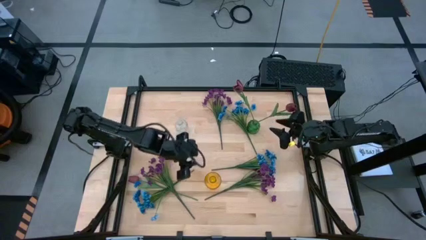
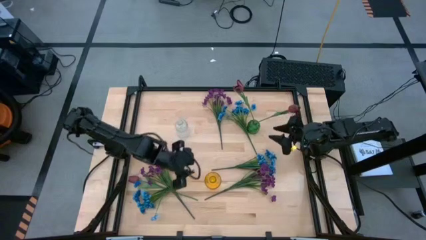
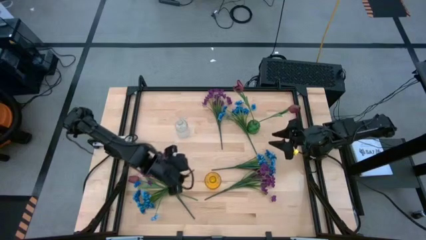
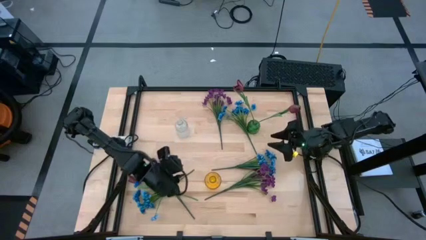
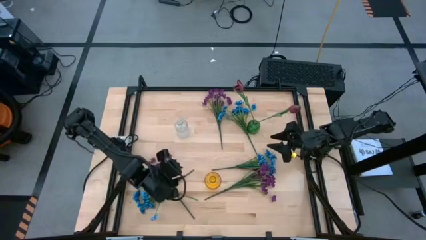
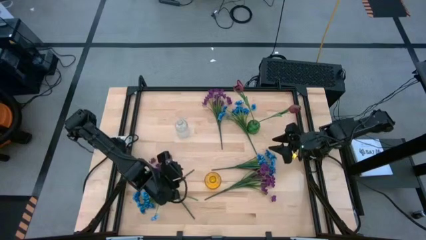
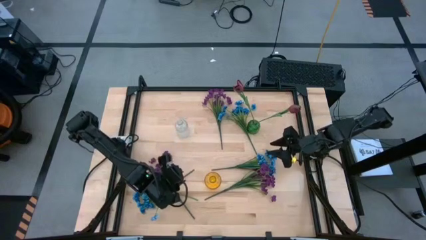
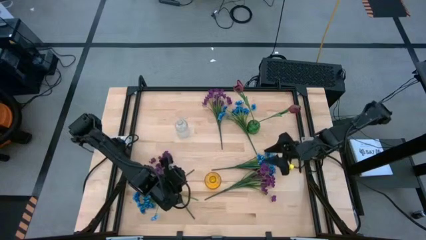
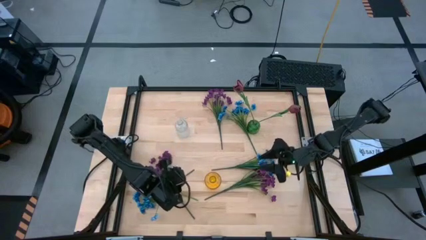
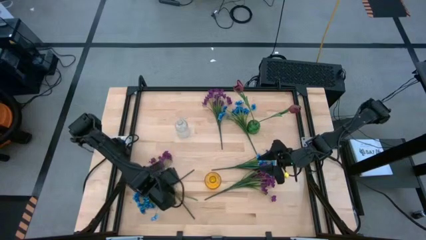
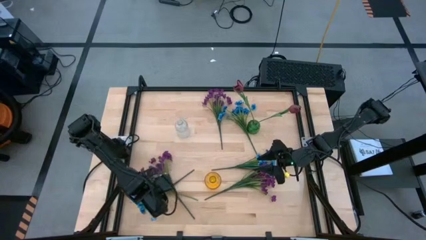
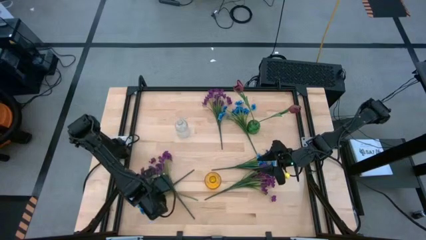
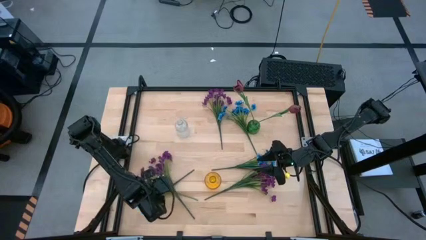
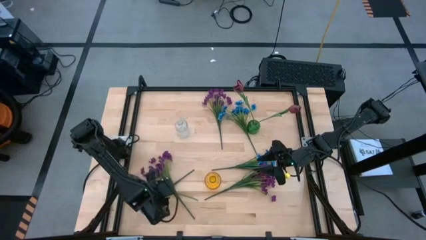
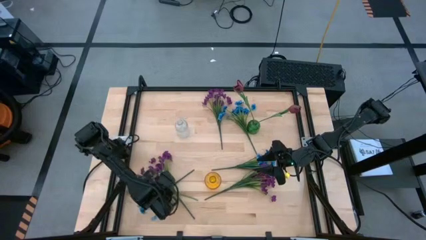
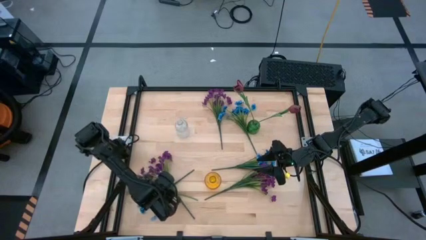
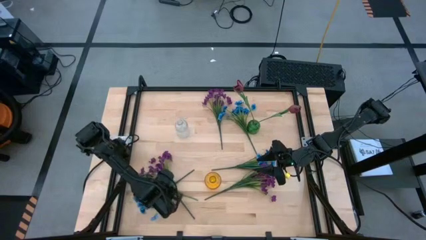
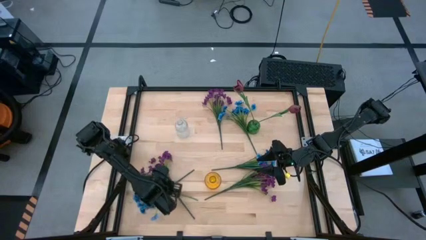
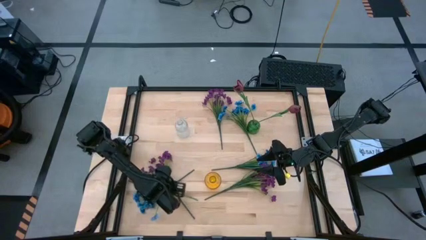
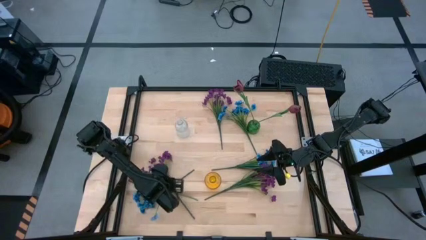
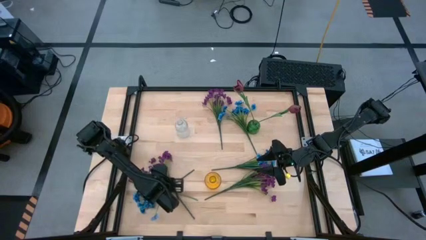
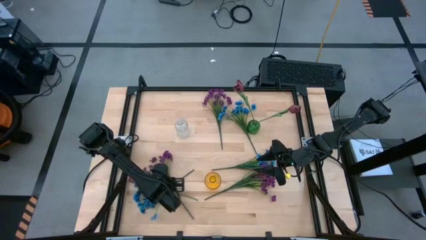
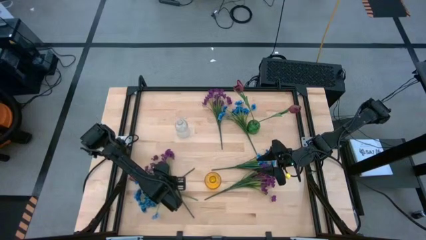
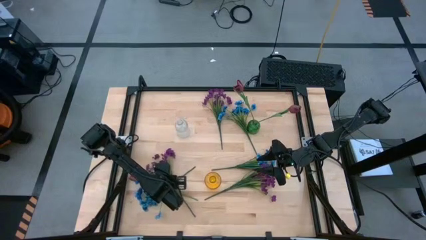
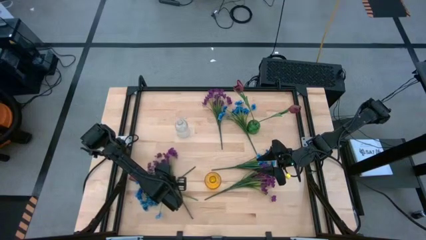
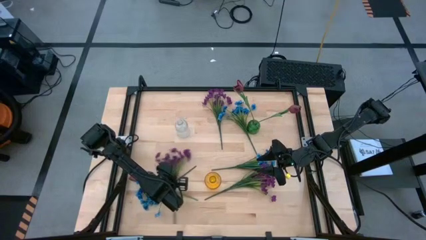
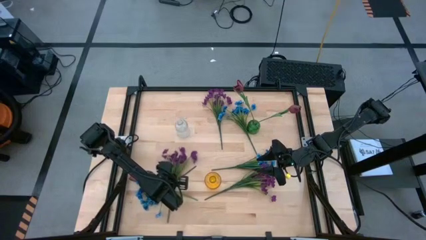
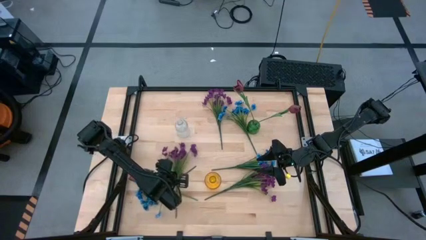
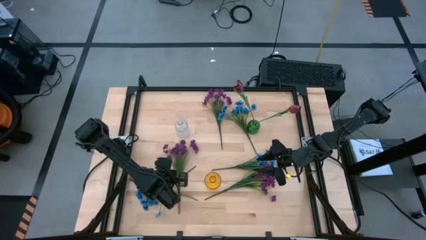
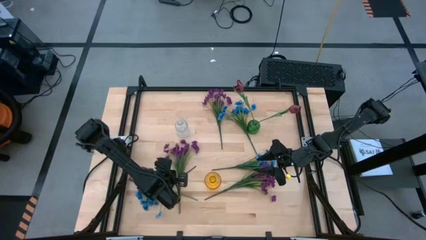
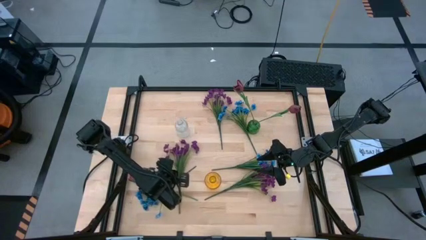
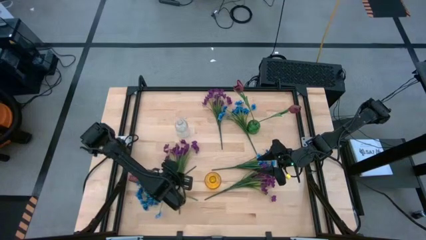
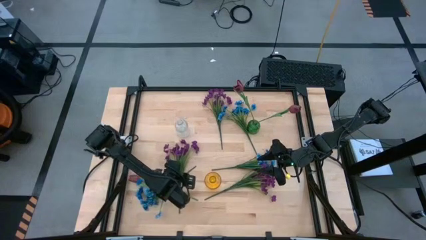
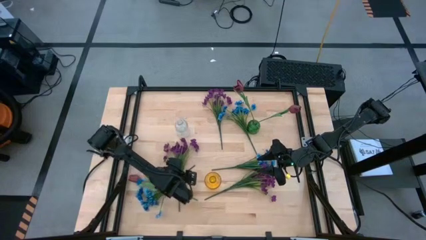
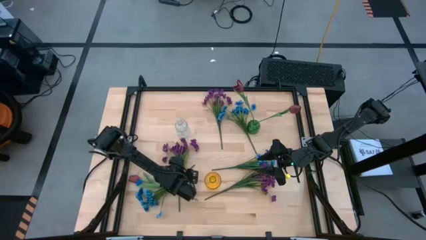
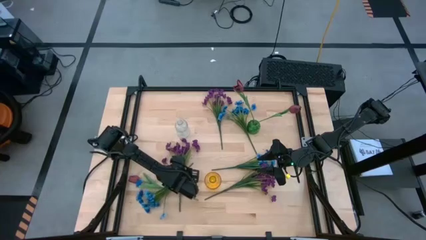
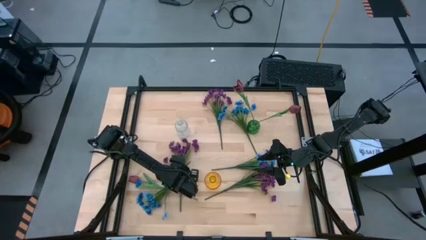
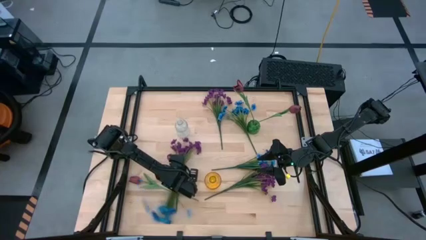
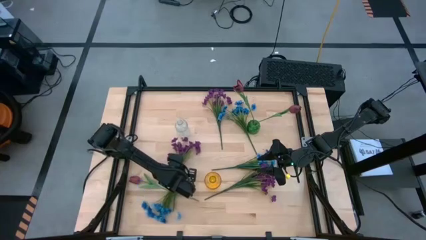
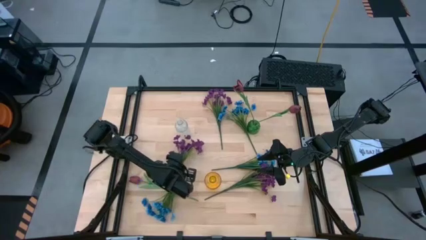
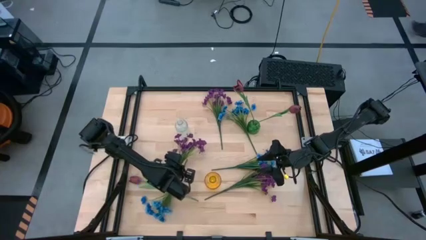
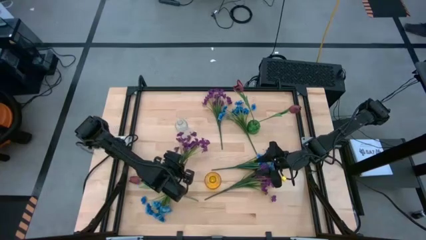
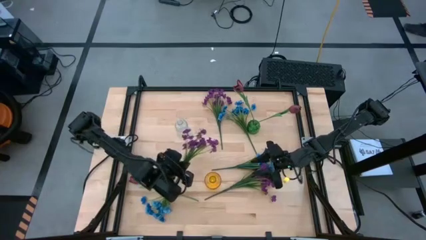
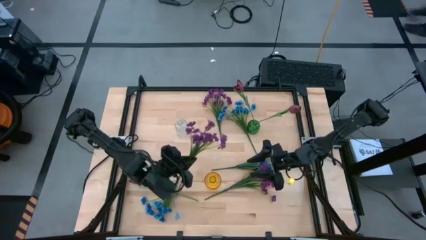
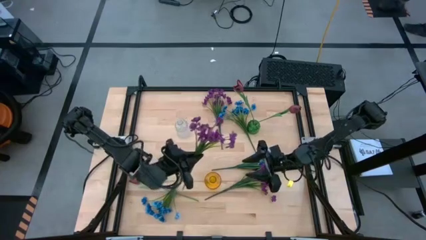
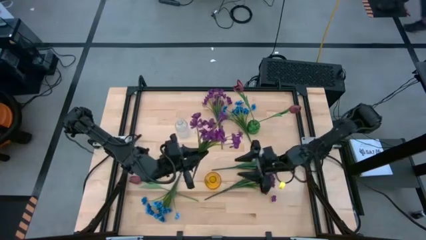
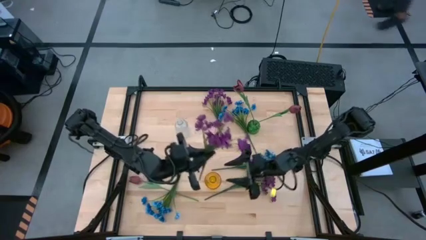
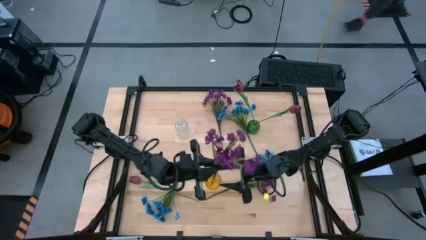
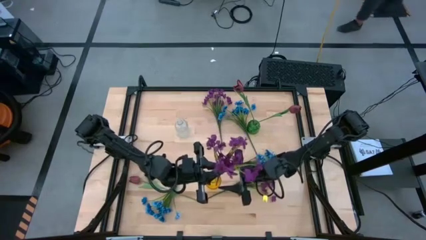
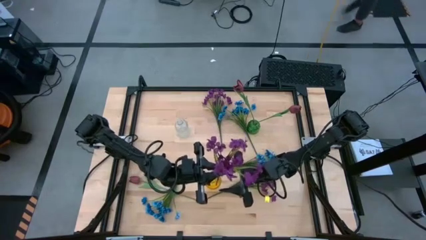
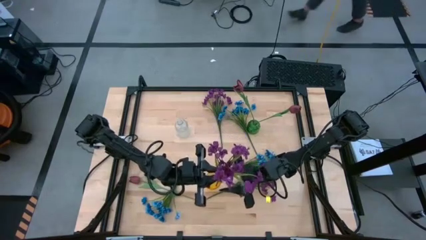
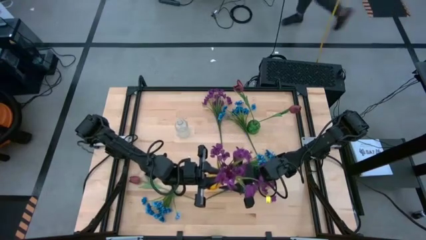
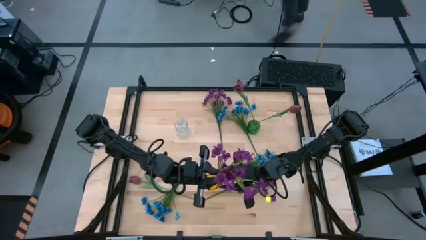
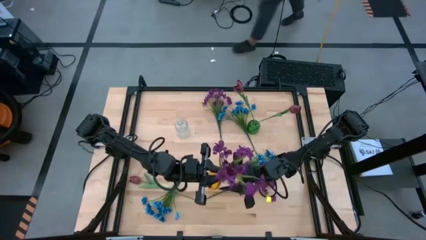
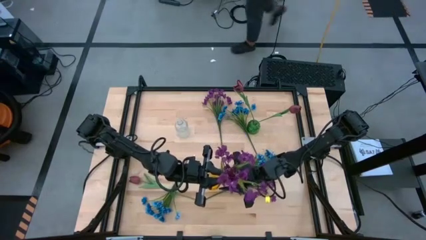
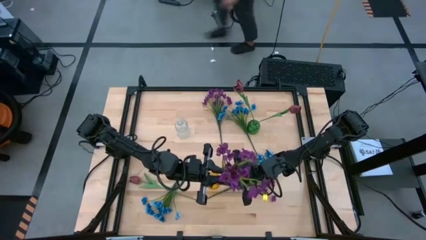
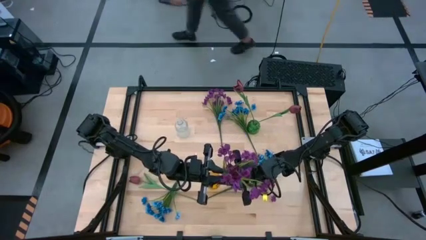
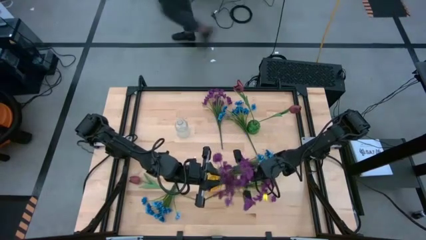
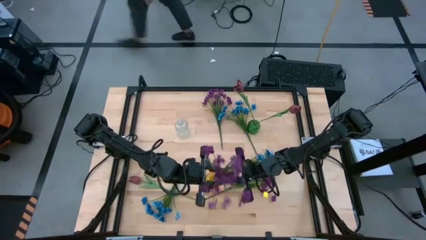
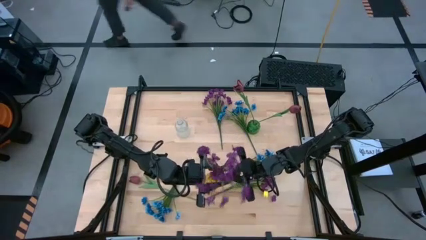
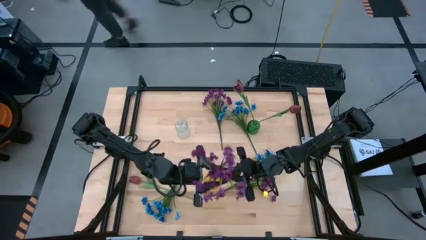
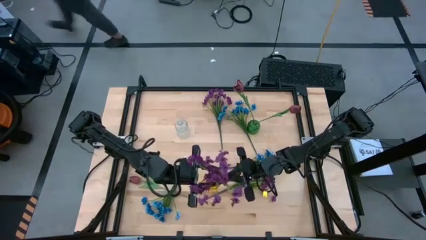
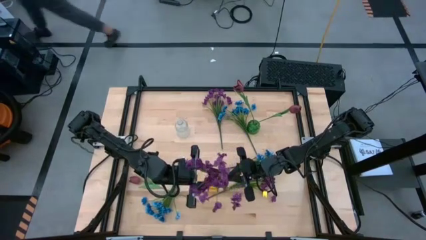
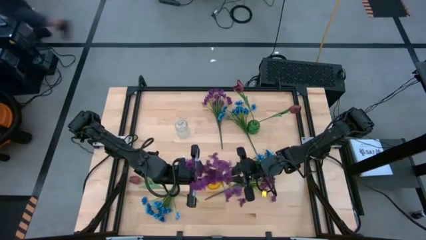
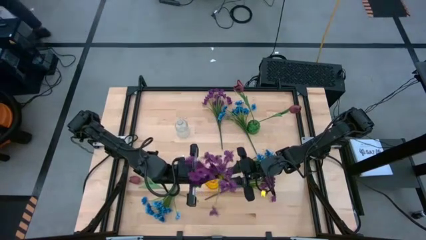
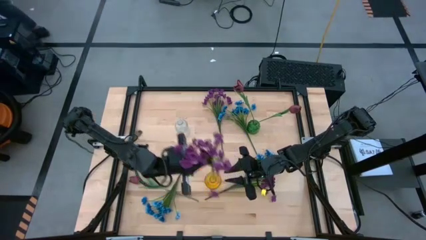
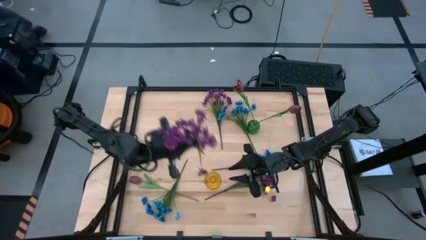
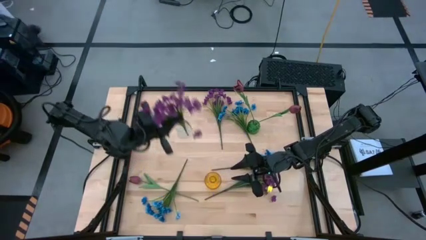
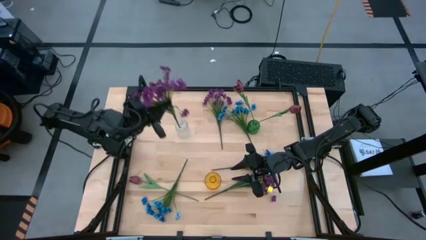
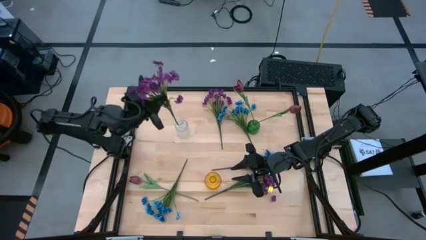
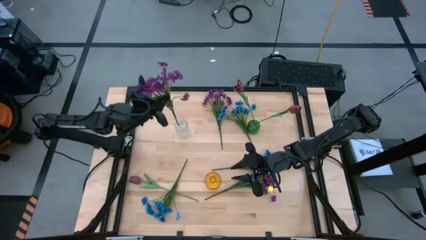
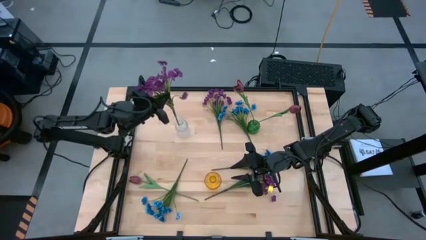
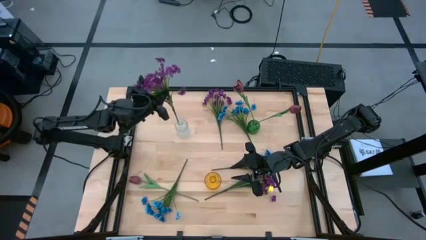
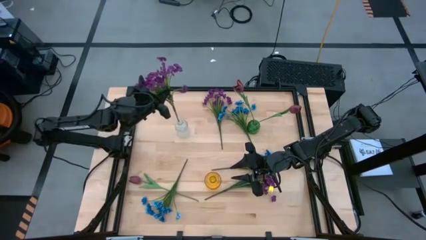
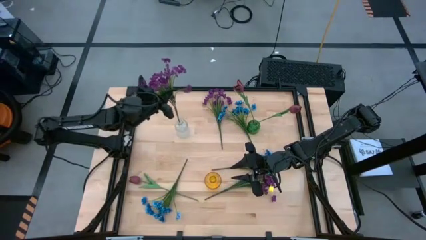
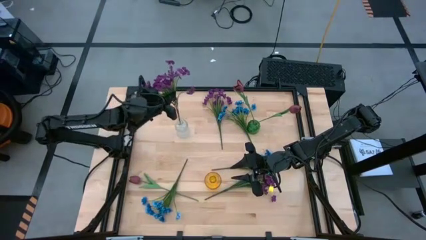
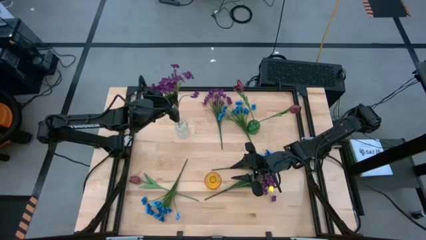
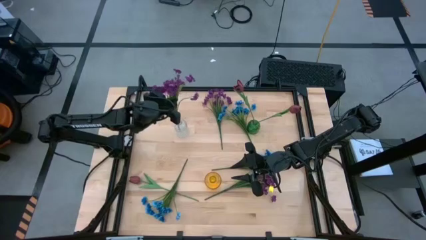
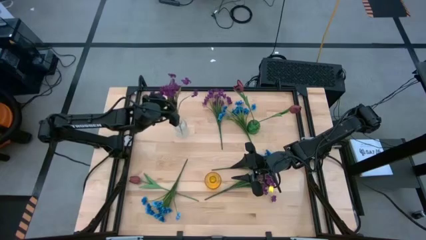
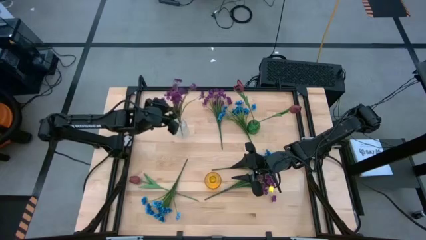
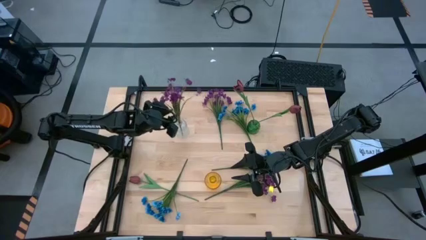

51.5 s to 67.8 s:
Task: Sort flowers into vase by color
Put the bottom left violet flowers into the transparent vase

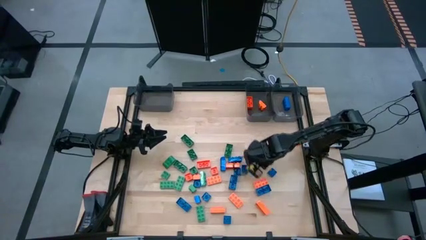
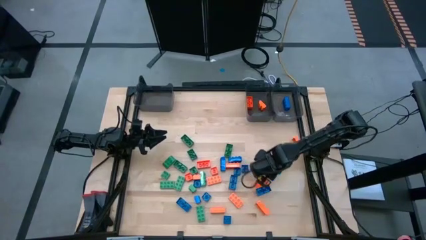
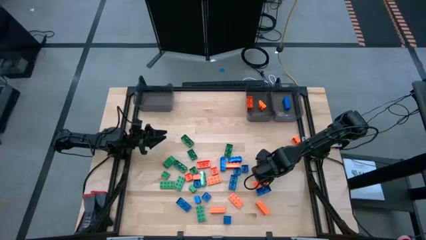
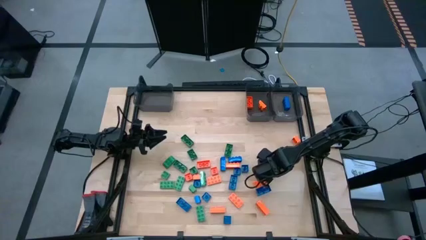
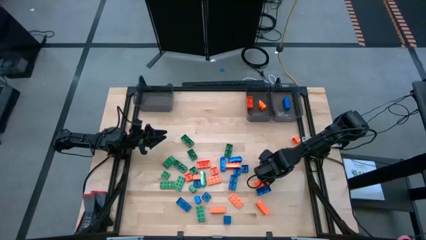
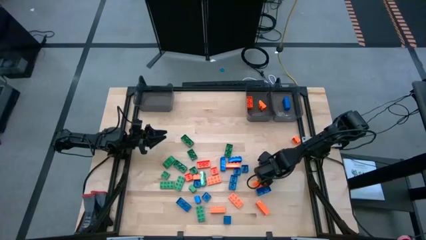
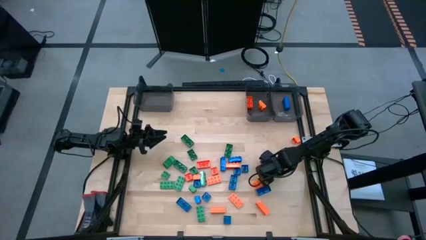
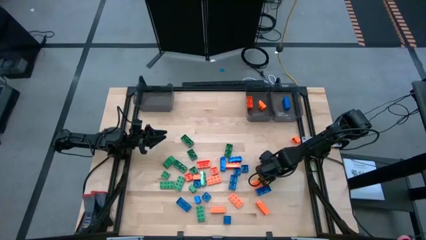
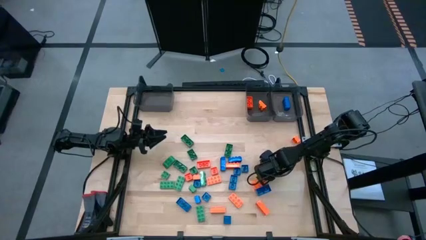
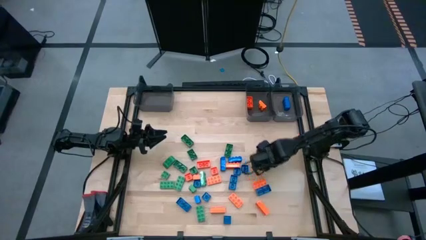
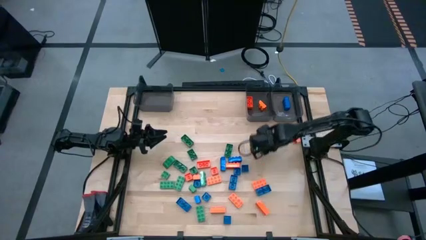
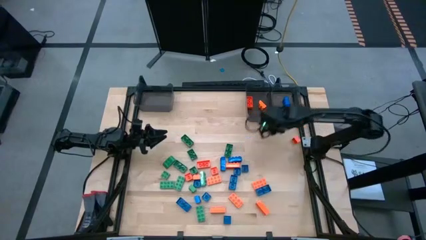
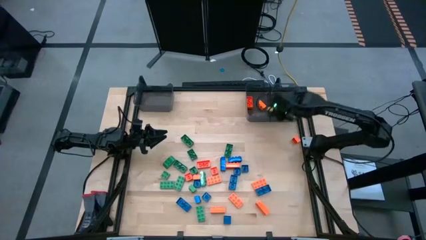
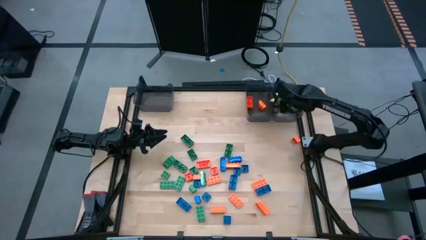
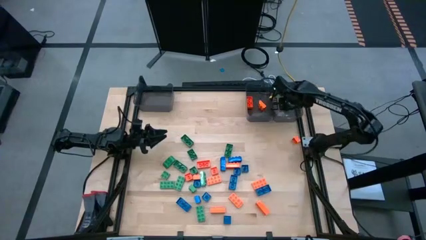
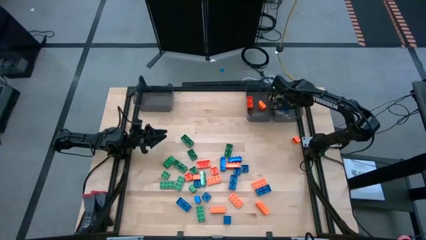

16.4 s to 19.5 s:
Task: Sort blocks
Put the blue game piece into the right black bin
